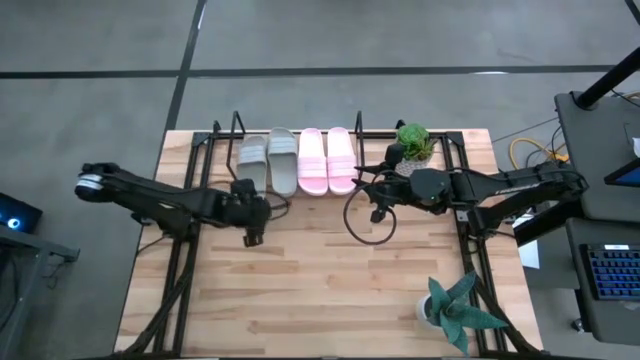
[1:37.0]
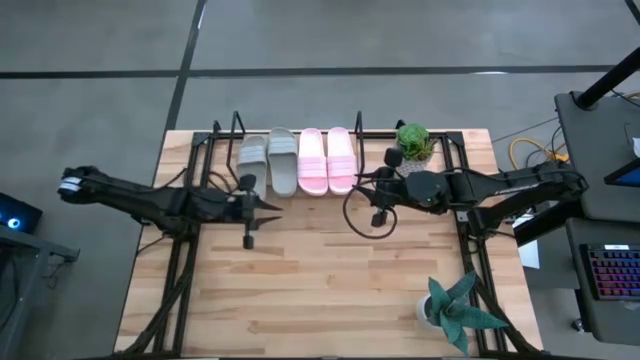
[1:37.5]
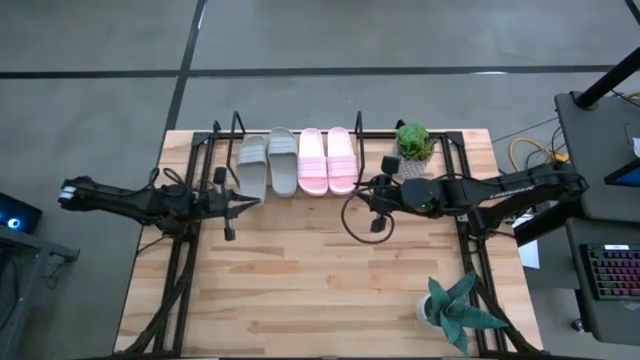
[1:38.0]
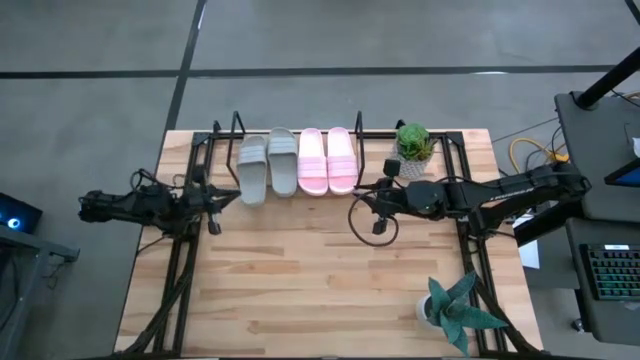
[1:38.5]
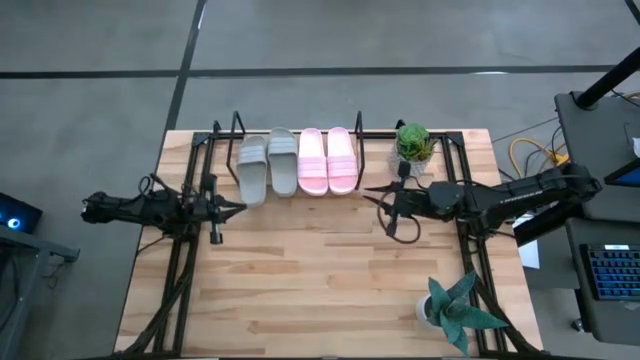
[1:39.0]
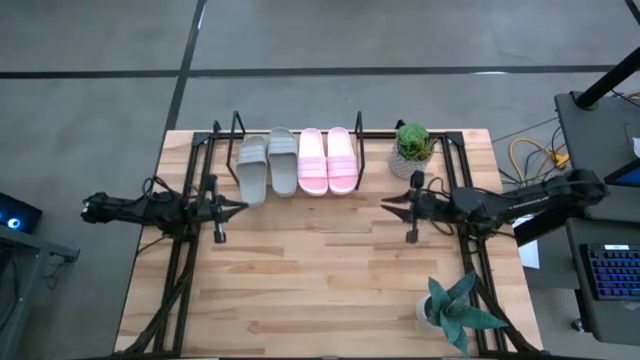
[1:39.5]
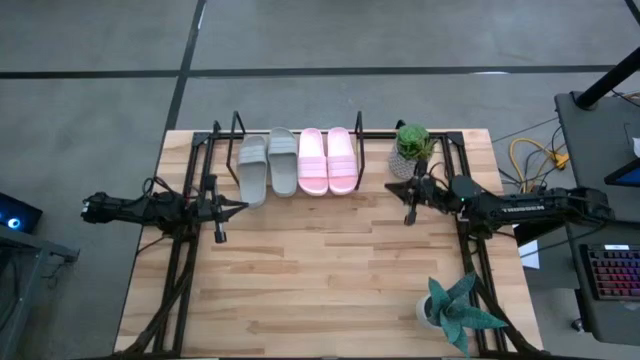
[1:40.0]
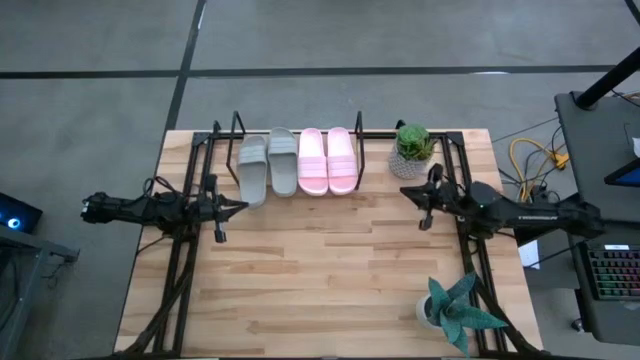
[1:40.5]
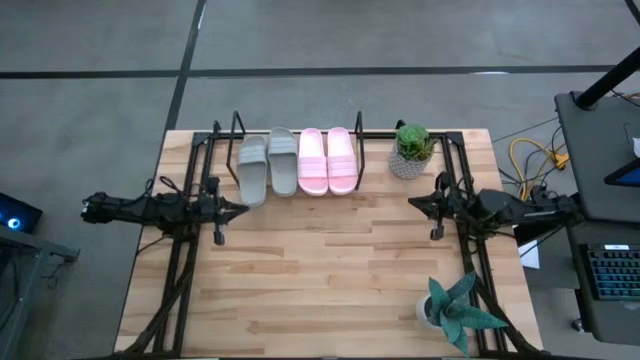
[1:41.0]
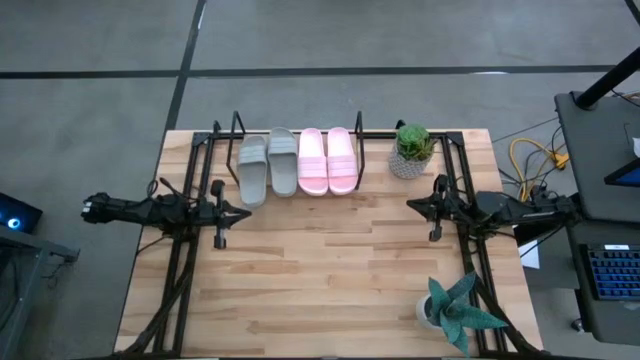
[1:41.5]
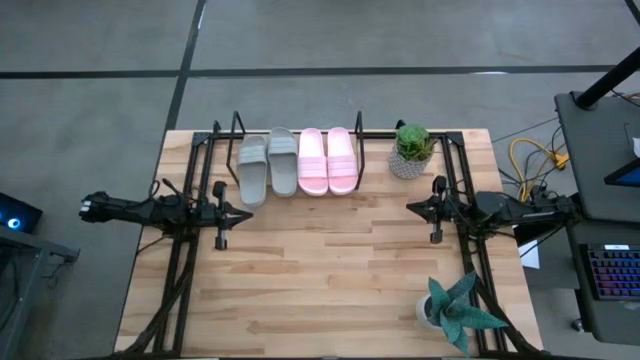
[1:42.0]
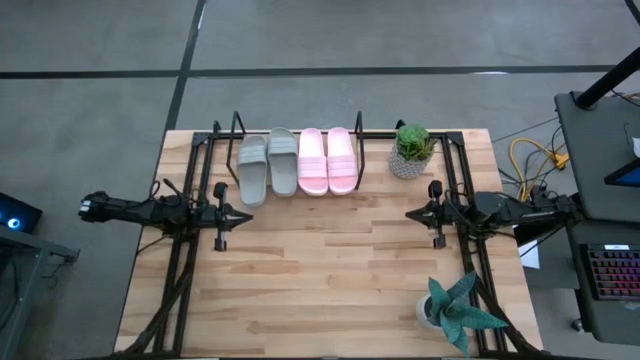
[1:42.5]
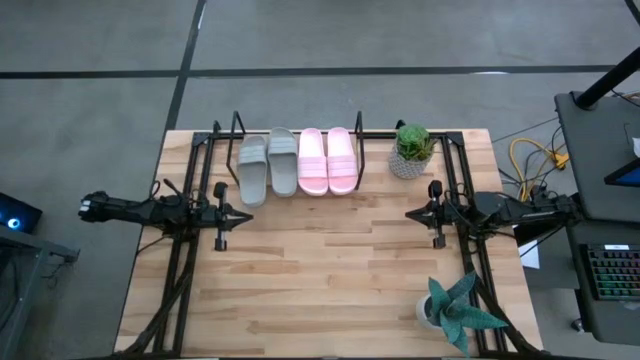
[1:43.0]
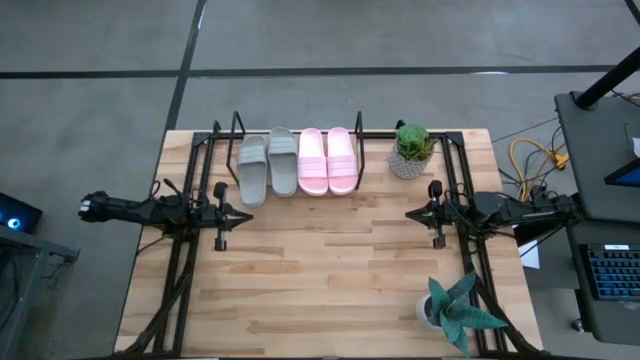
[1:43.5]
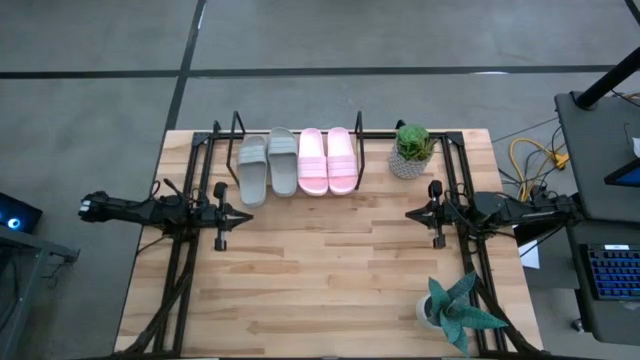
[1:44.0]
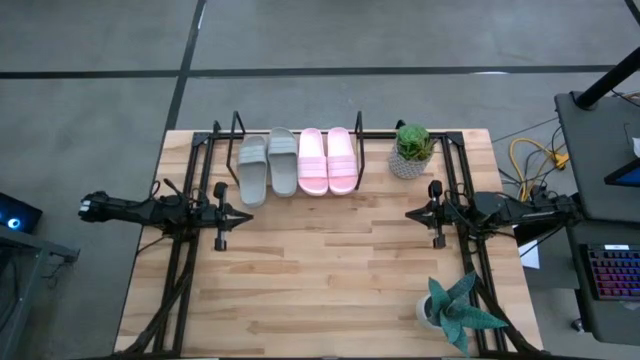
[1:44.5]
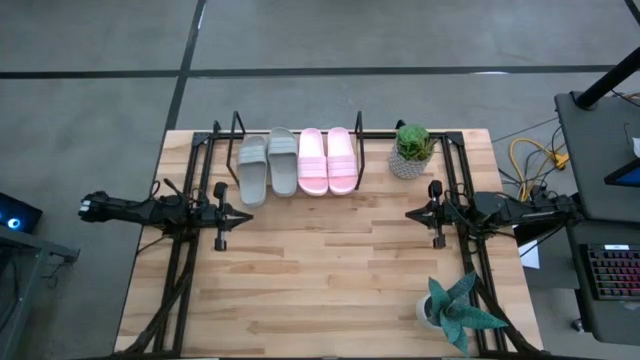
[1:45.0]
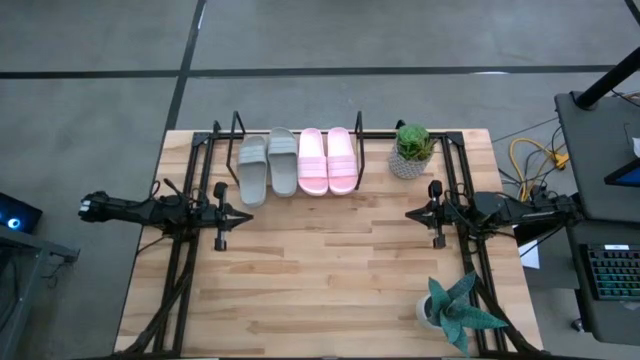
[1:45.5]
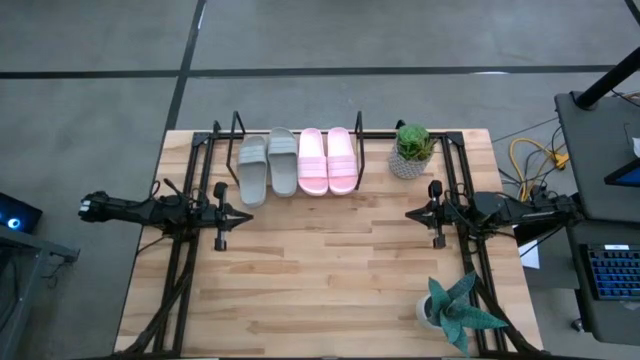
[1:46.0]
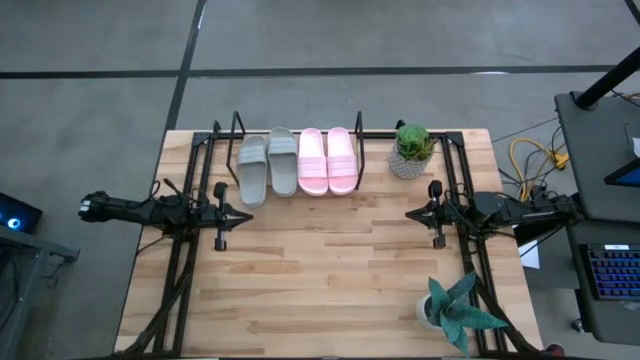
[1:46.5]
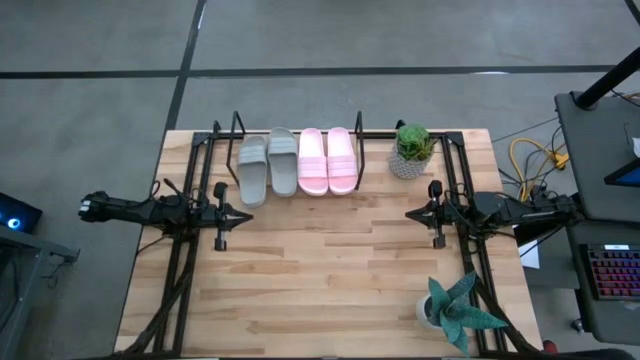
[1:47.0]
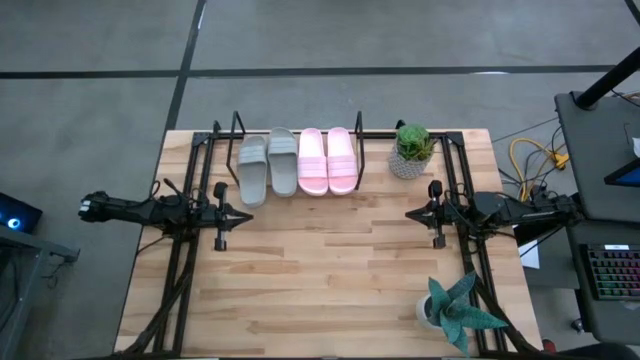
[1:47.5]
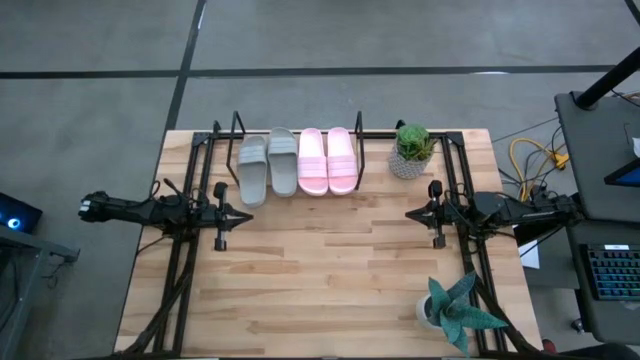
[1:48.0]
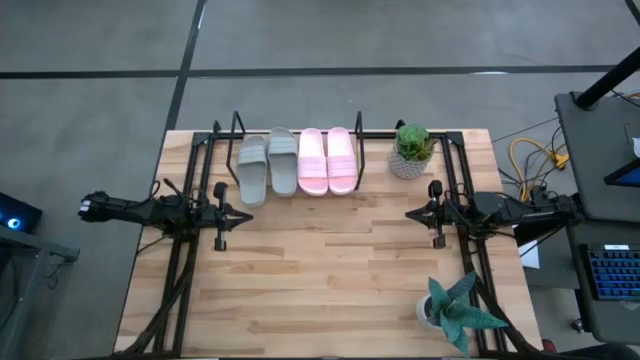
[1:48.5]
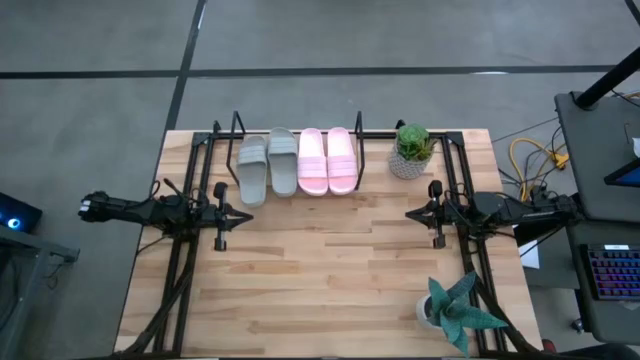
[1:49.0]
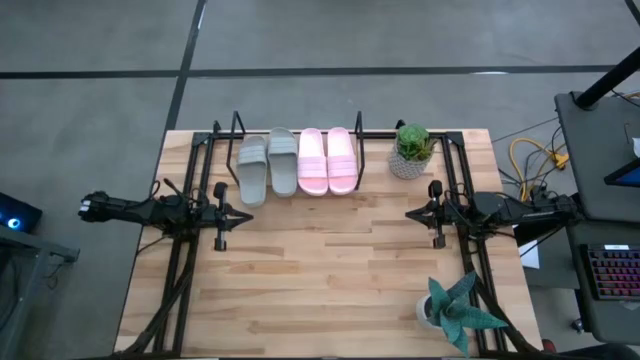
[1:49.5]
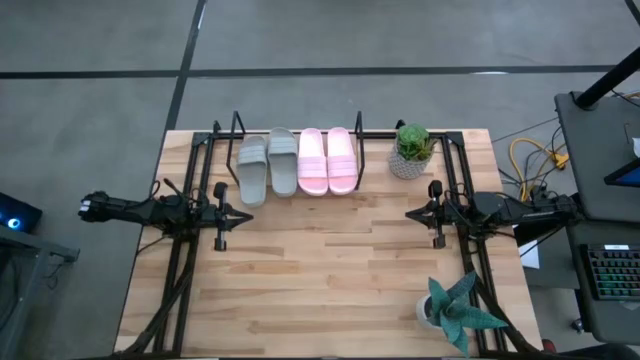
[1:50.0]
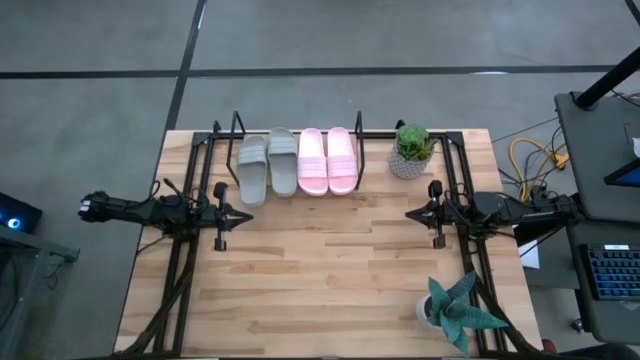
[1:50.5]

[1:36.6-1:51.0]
Task: Pick and place slides into the shelf
Return to Home Position

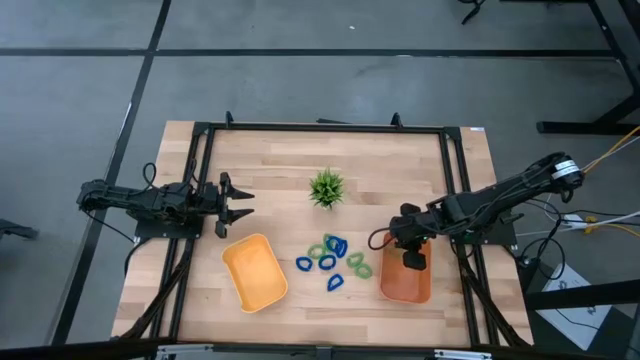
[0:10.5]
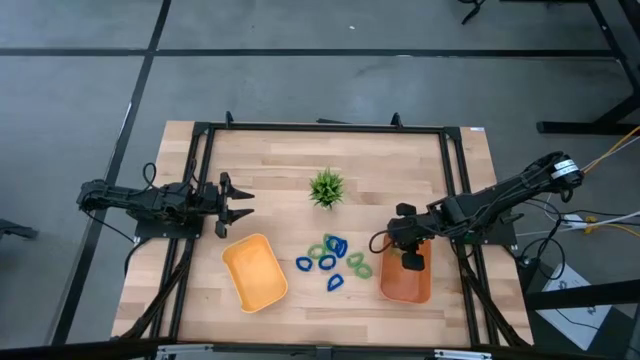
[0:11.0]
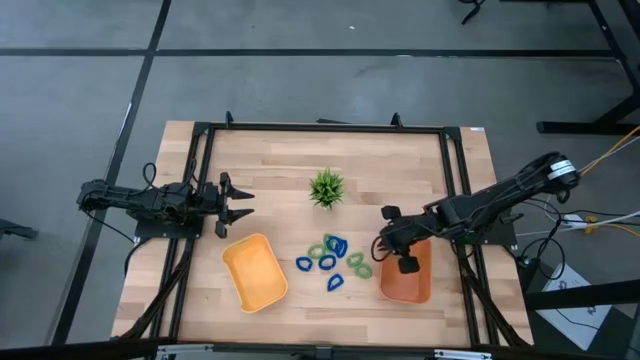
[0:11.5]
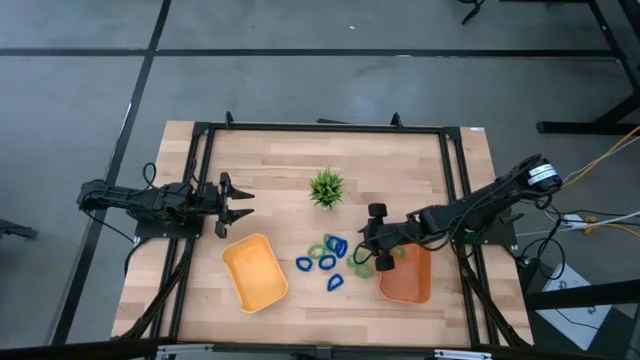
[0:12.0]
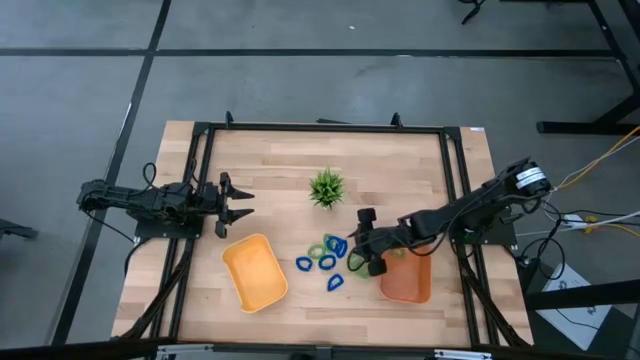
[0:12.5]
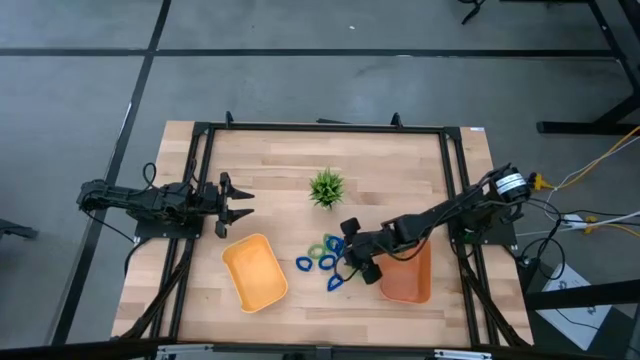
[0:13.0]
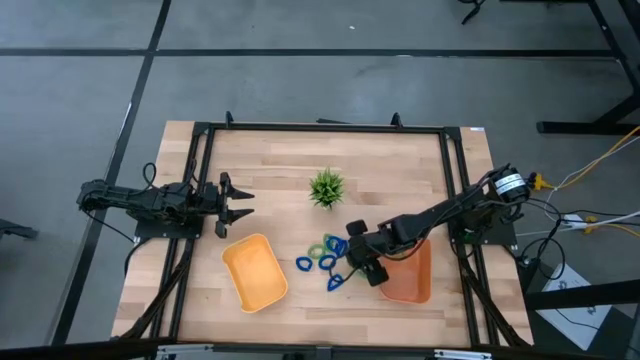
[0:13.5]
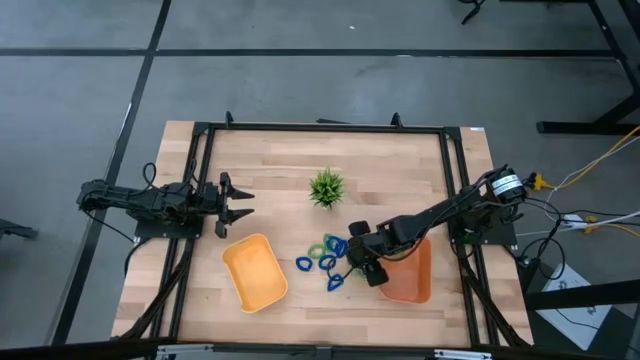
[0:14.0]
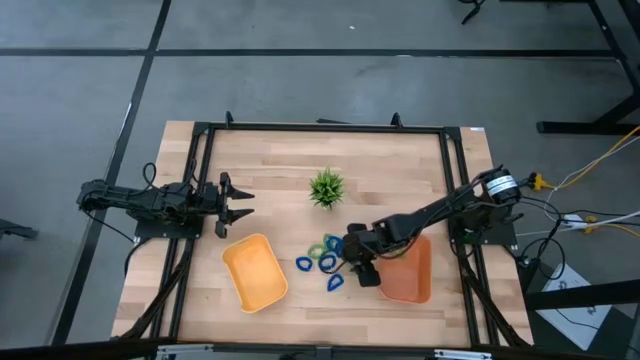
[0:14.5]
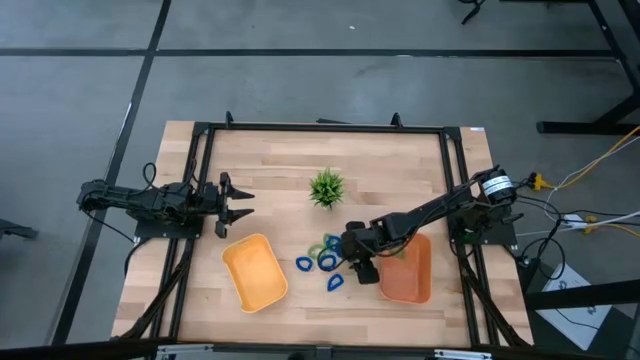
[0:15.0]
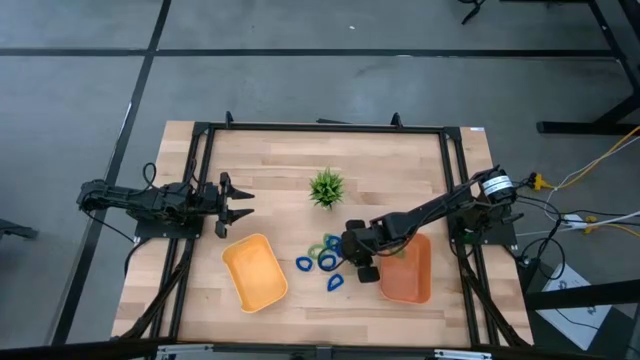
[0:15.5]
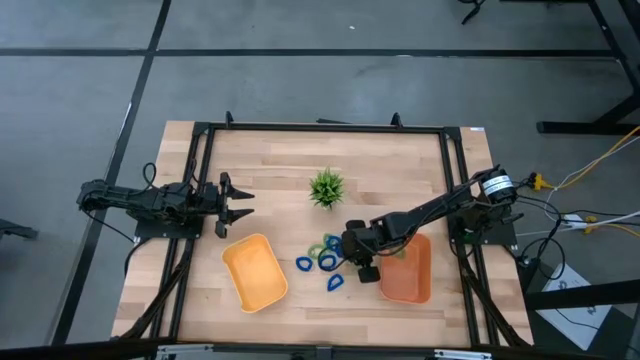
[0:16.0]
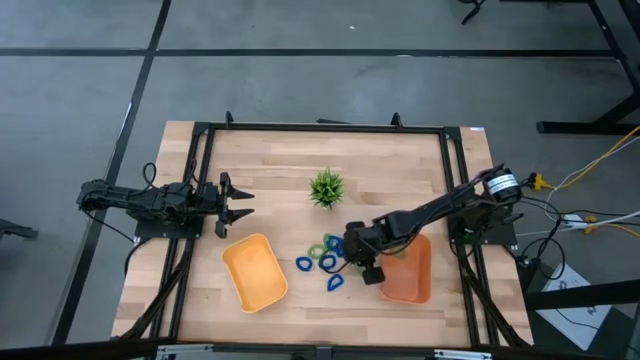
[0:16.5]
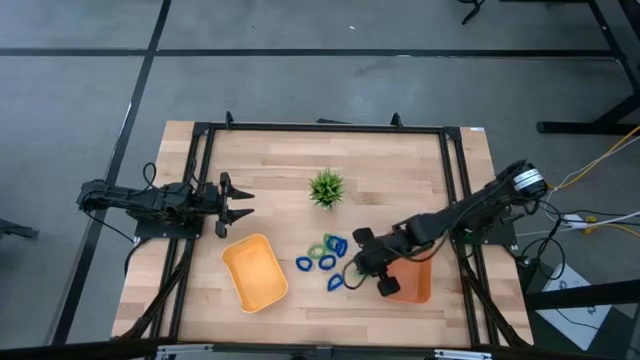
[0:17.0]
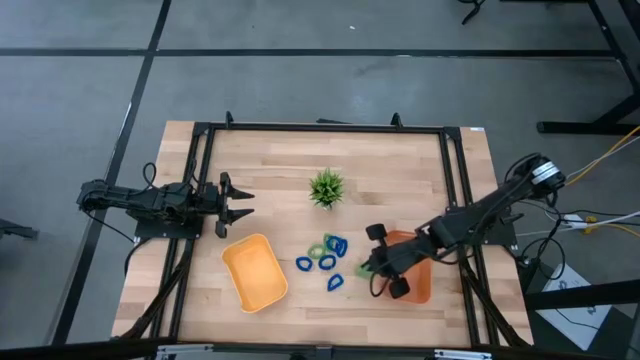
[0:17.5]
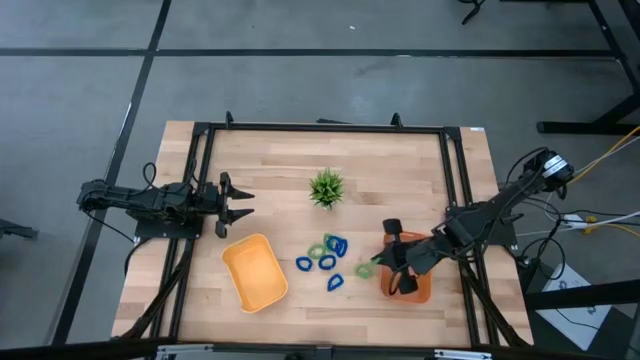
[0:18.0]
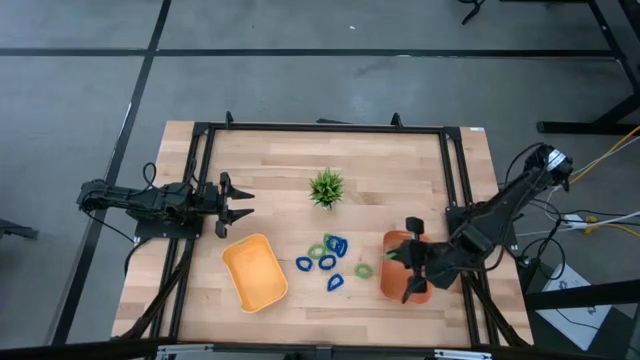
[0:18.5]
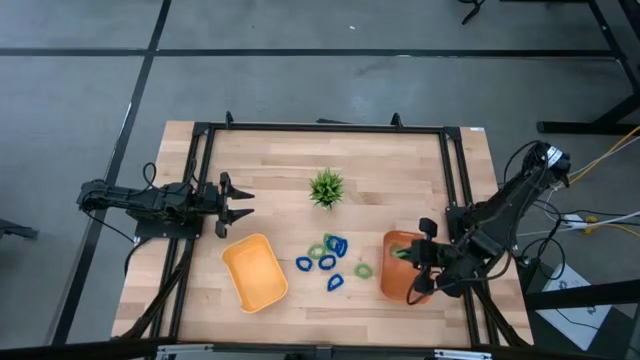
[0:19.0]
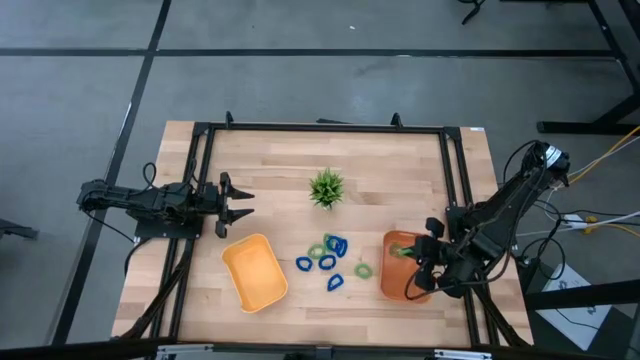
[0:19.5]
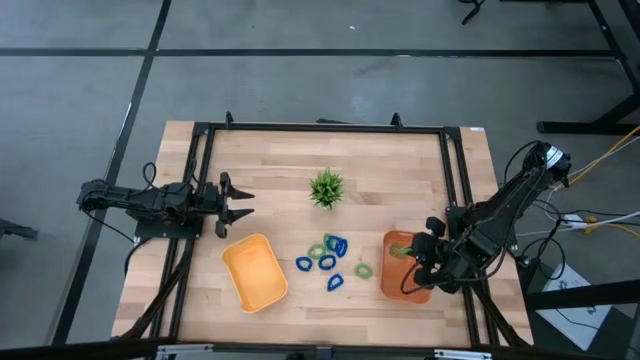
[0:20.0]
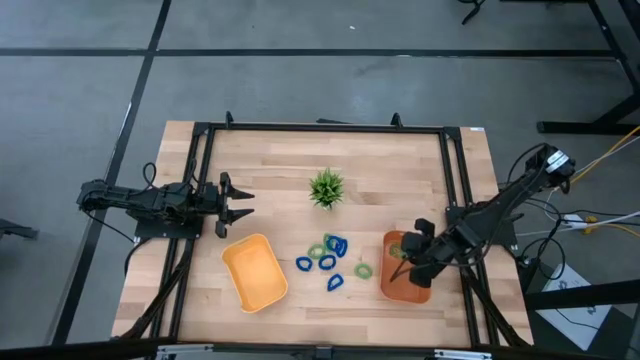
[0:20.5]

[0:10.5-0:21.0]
Task: Sort spring keychains
Put the green spring keychain into the orange bin
